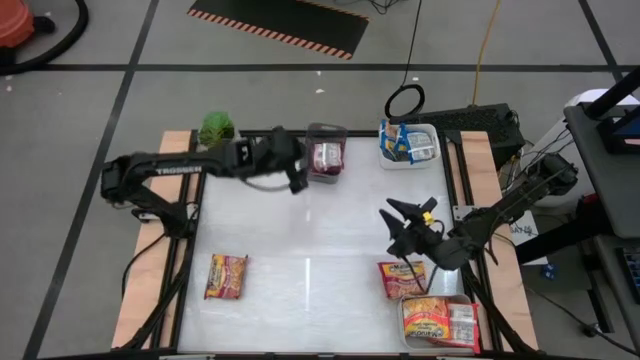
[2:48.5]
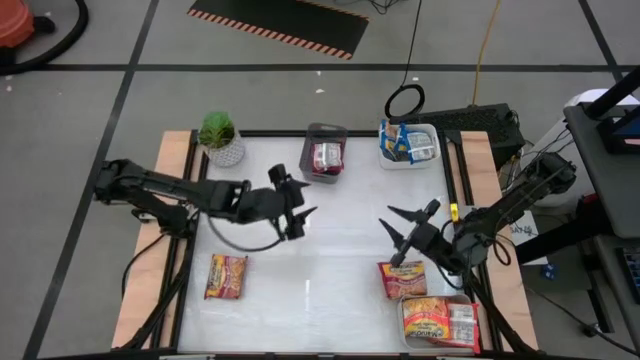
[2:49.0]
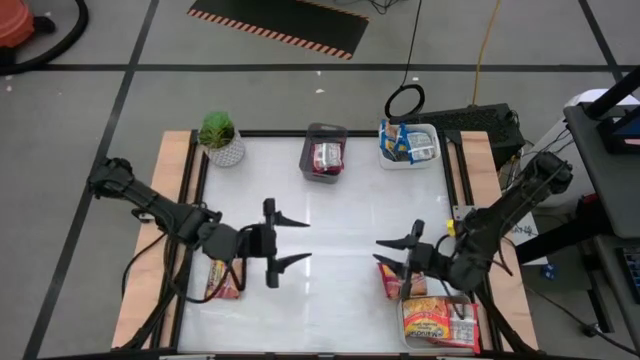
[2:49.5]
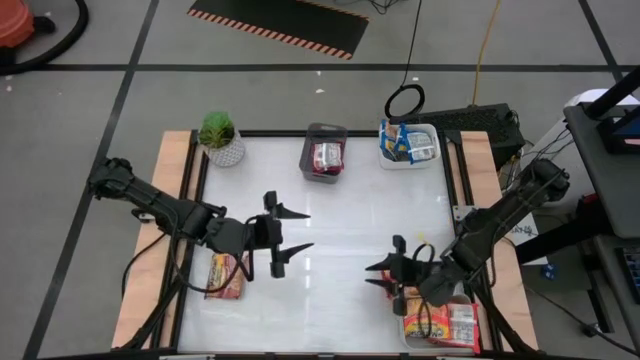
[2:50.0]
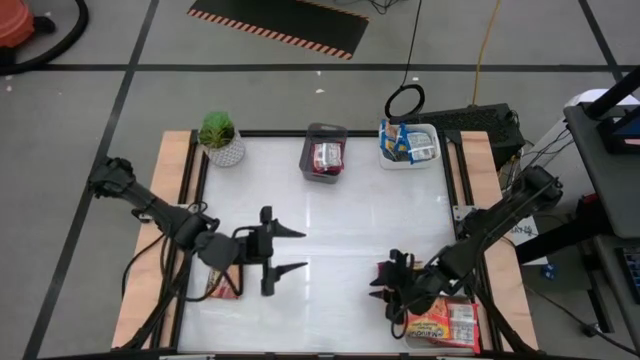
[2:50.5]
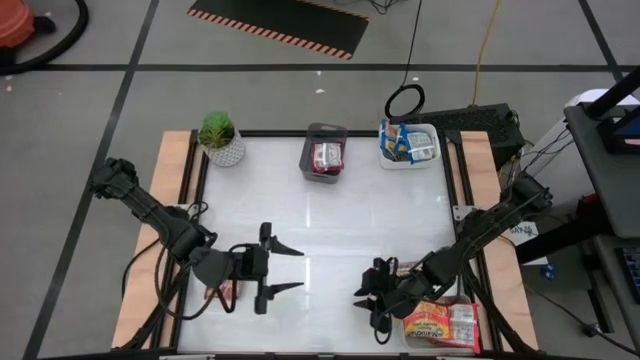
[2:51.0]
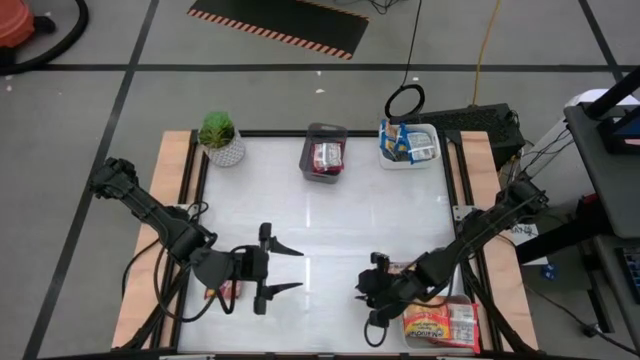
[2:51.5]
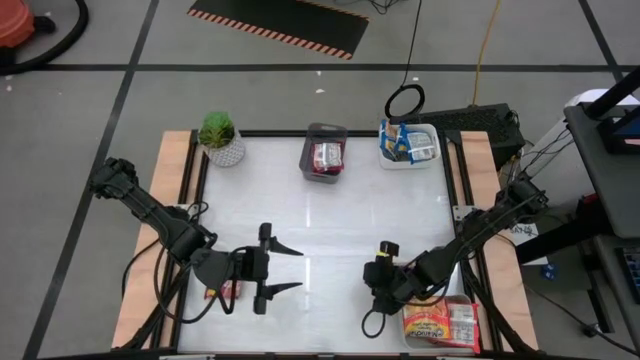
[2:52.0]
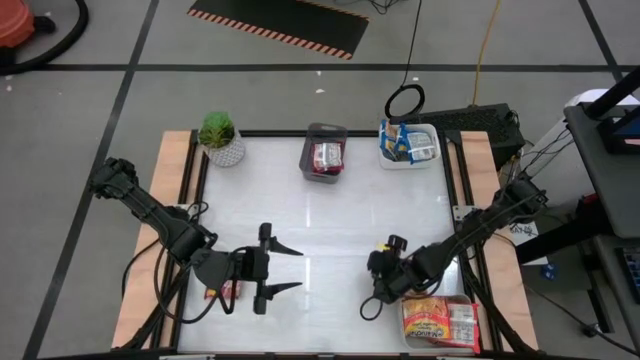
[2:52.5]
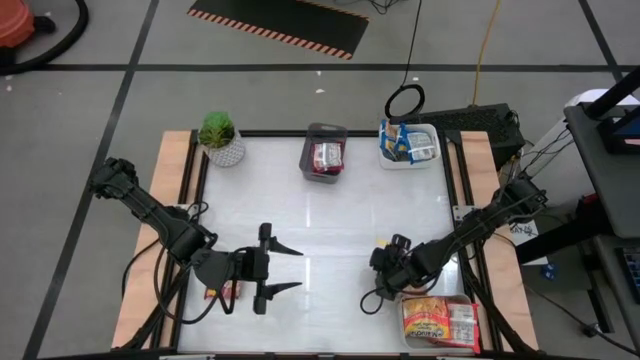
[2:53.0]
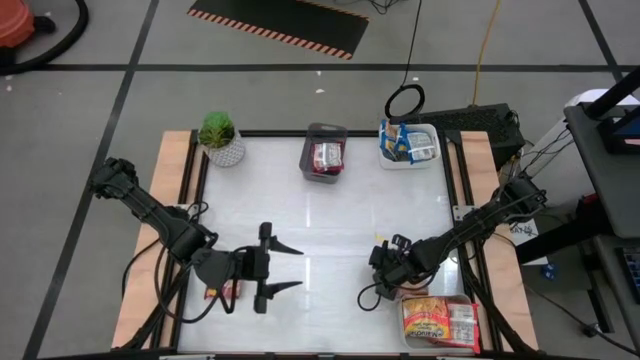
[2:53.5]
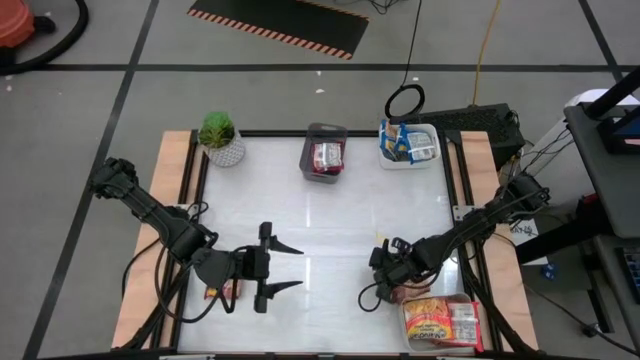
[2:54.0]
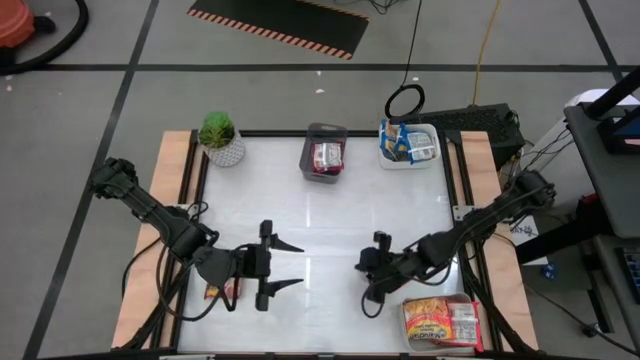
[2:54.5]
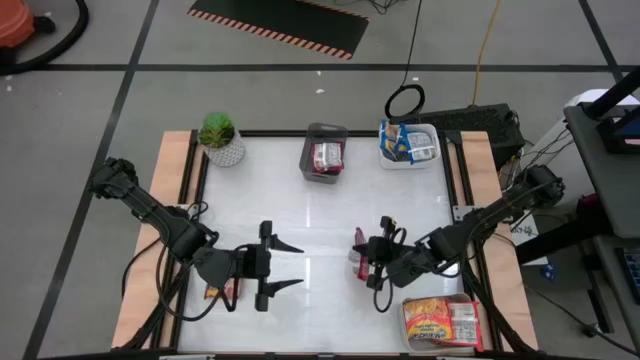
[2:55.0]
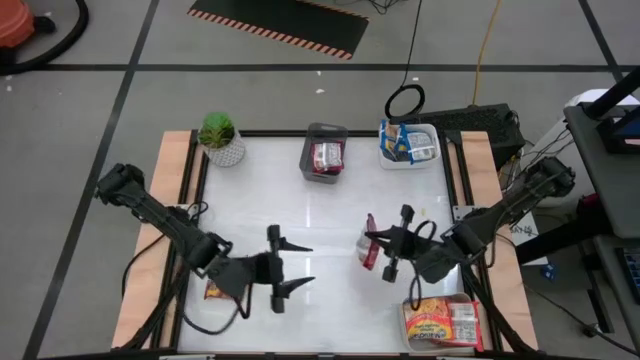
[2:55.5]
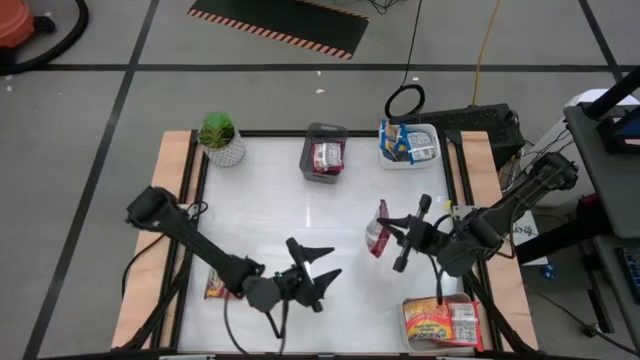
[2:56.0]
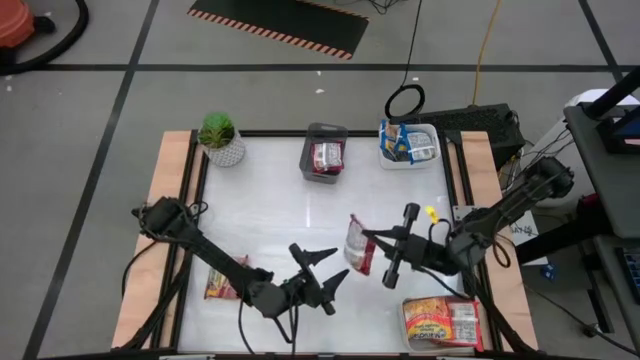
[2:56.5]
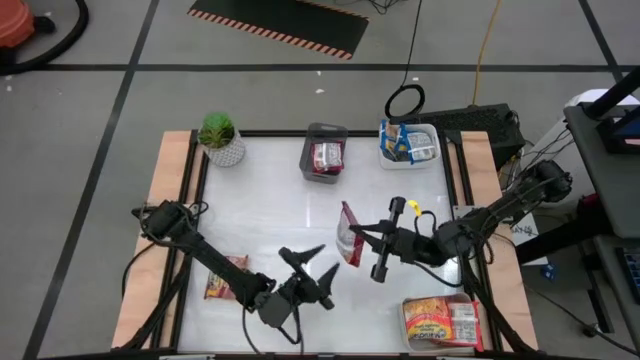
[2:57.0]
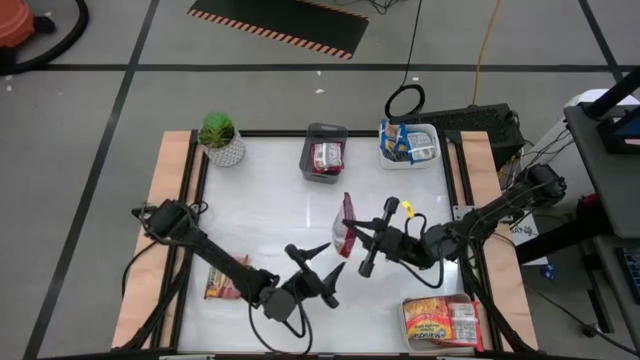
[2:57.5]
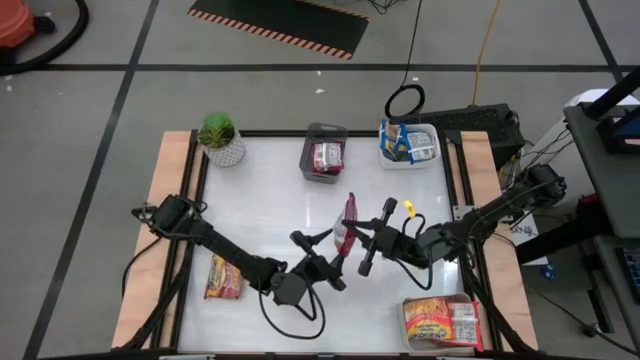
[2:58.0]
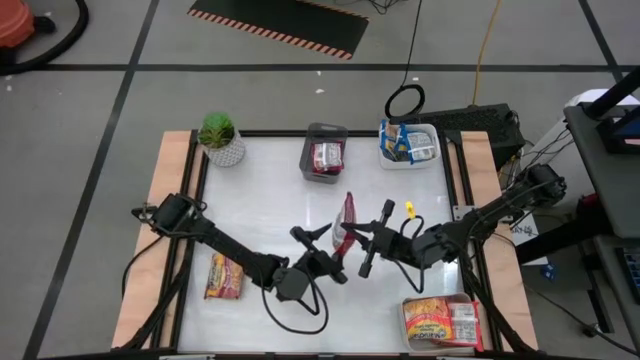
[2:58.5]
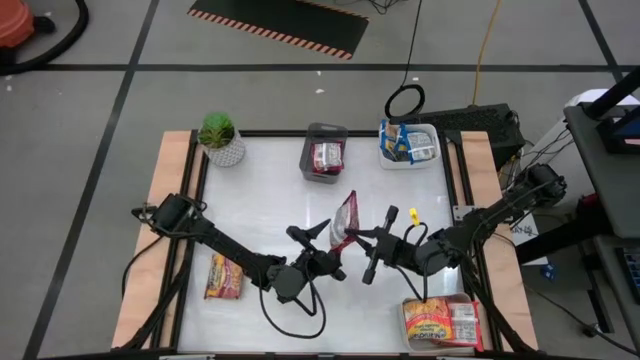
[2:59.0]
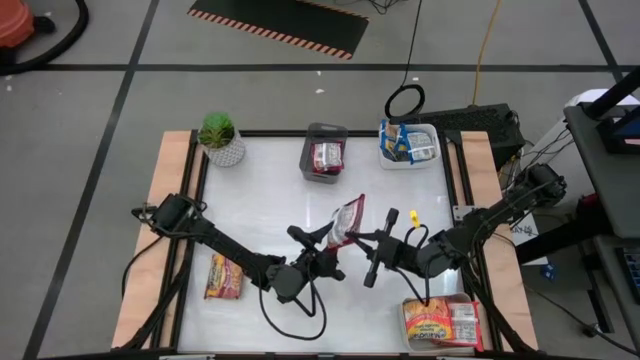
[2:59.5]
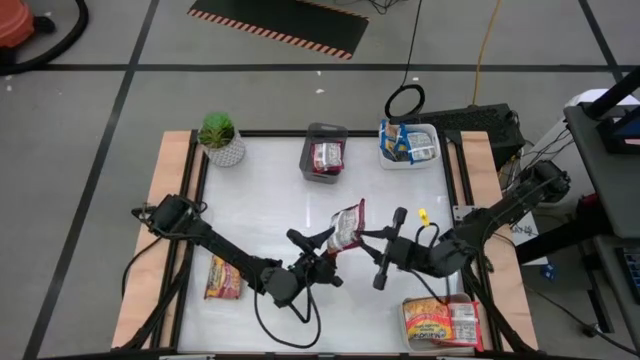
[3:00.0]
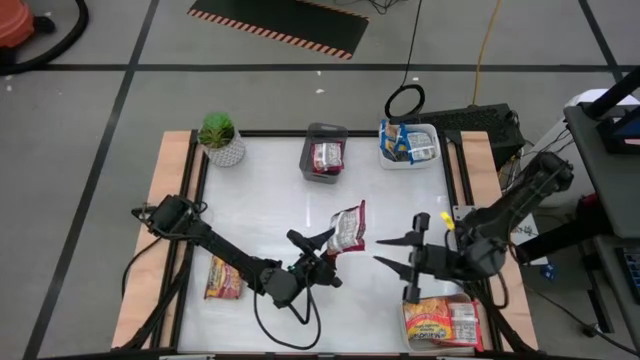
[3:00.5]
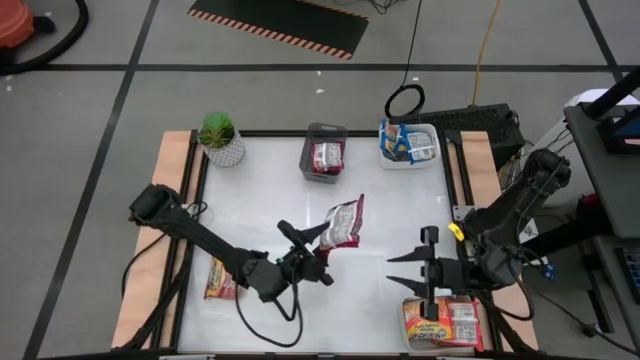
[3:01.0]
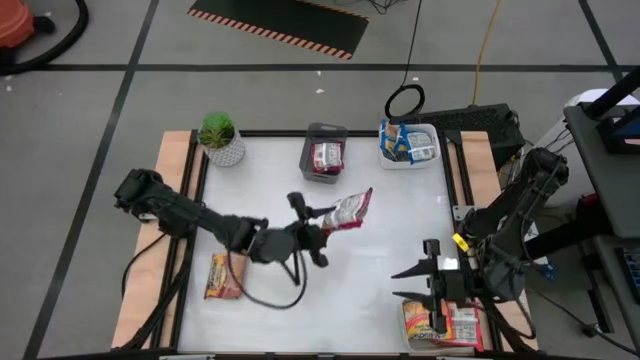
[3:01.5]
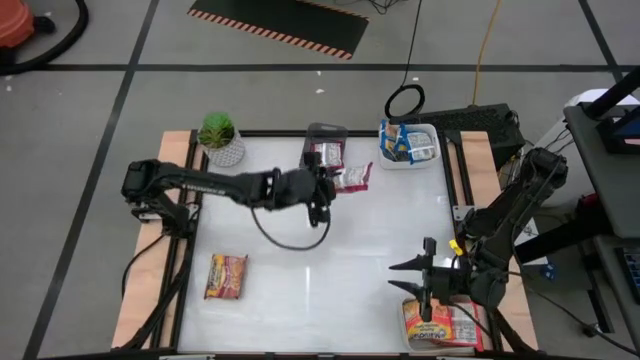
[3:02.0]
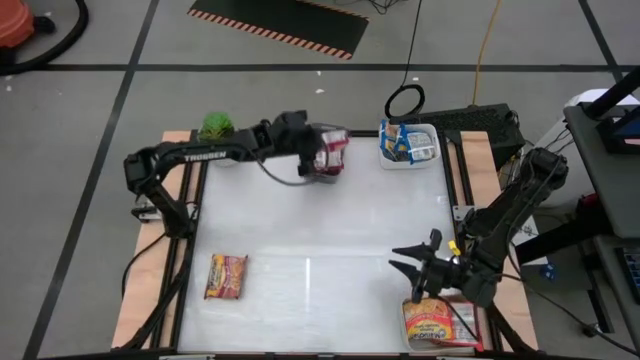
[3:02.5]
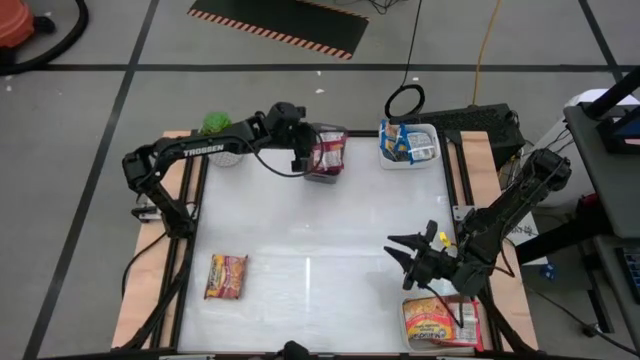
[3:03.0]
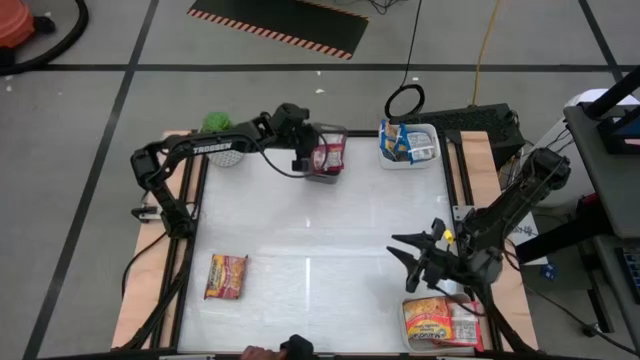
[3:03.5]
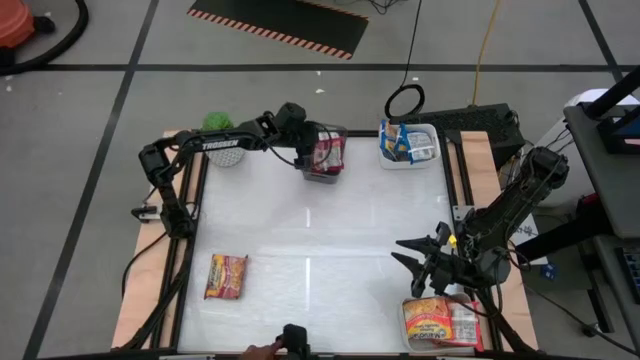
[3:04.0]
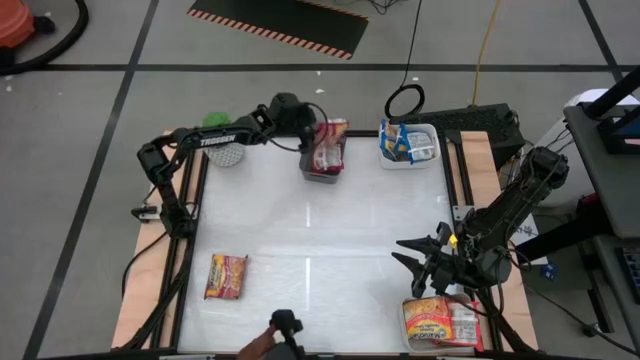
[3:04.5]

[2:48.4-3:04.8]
Task: Sort Maruchan noodles
Put the right red noodle pack into the black bin

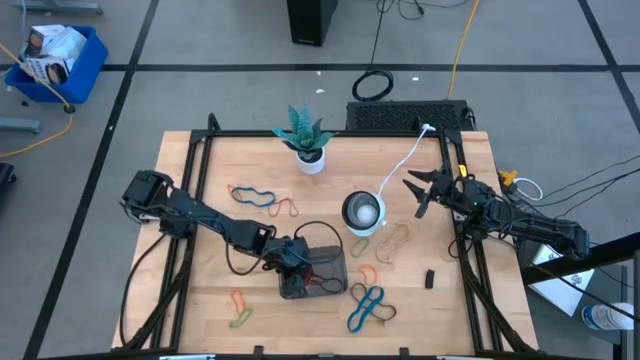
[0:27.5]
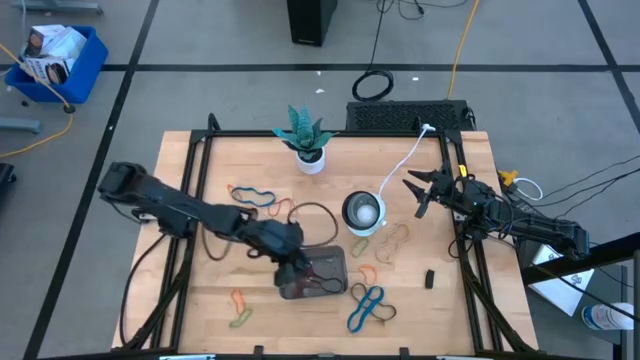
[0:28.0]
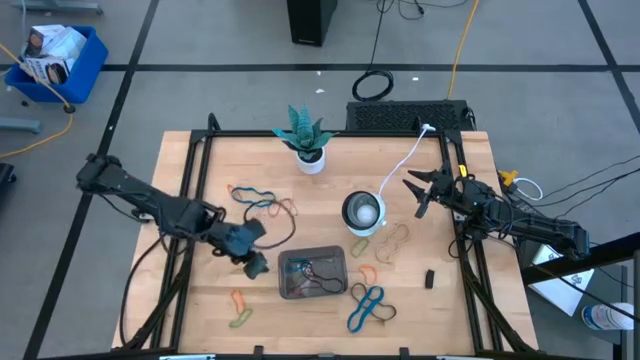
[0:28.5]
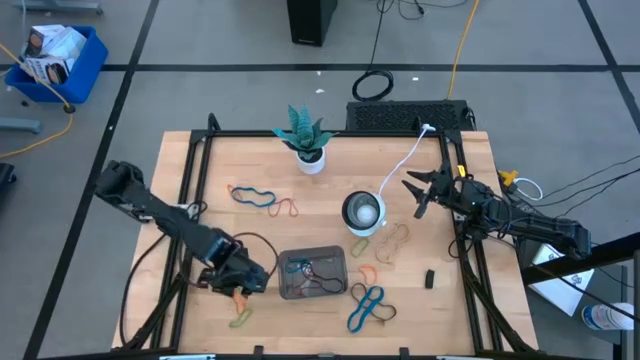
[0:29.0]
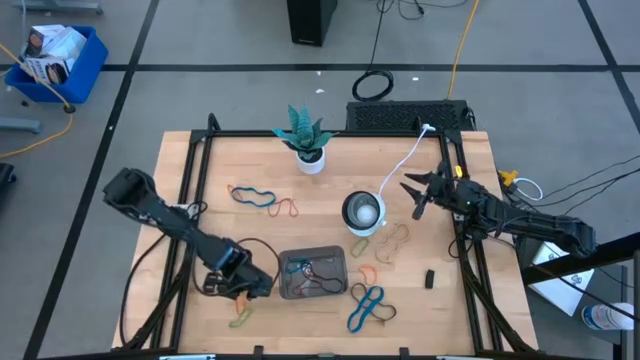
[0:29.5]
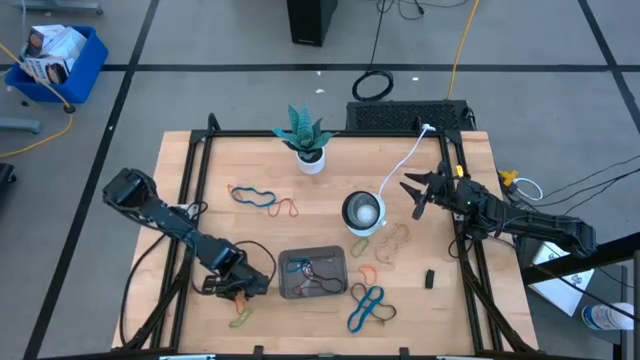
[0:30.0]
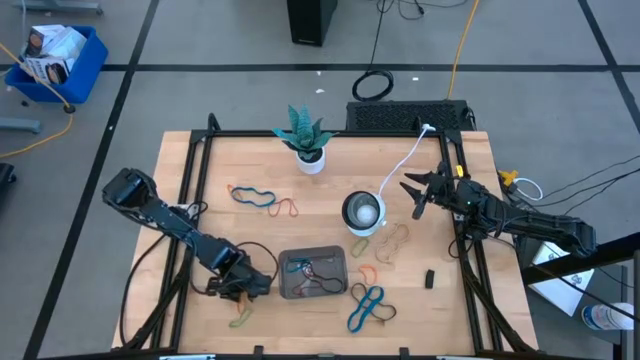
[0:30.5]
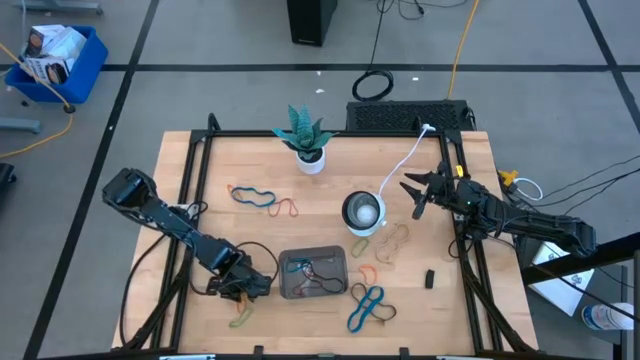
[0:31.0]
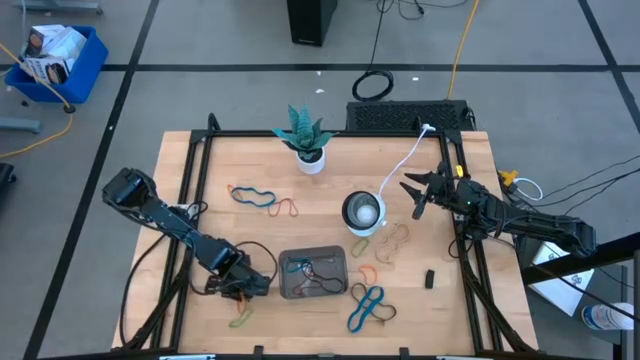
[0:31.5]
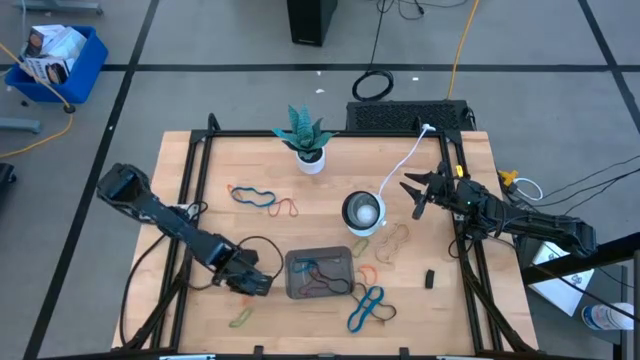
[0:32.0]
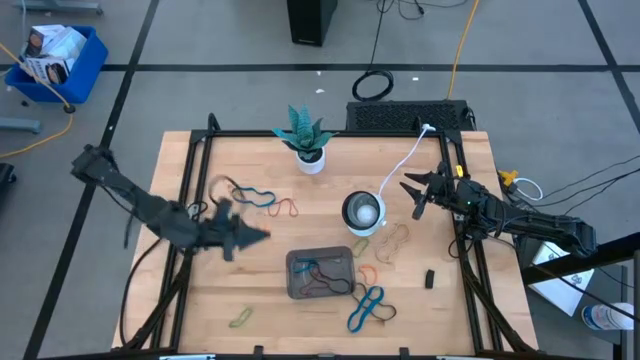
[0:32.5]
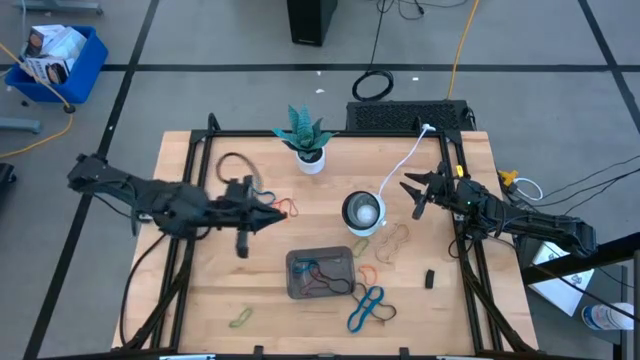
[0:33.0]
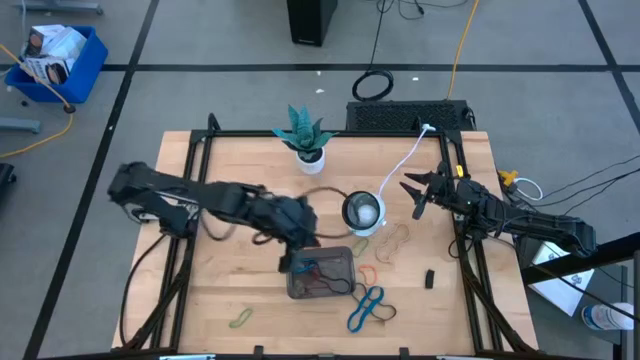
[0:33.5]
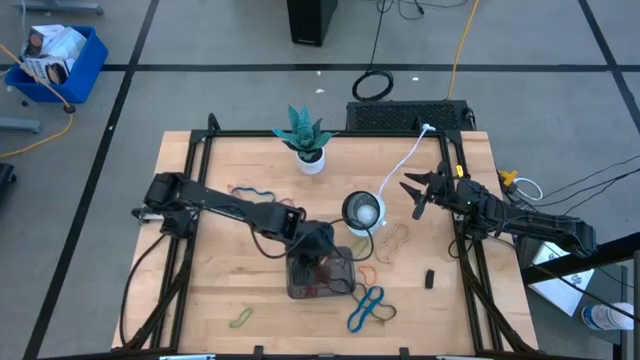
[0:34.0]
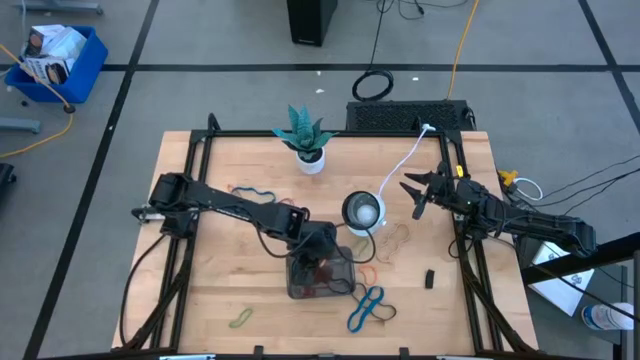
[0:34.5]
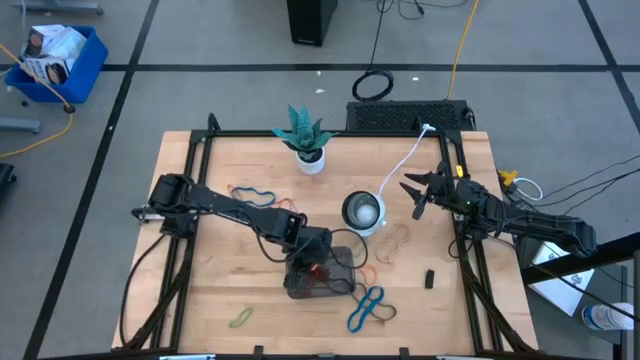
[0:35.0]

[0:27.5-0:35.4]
Task: Pick and place rubber bands into bin
Put the bottom left orange rubber band into the gray bin
